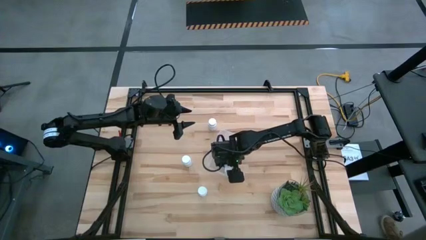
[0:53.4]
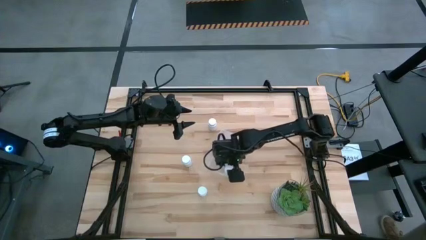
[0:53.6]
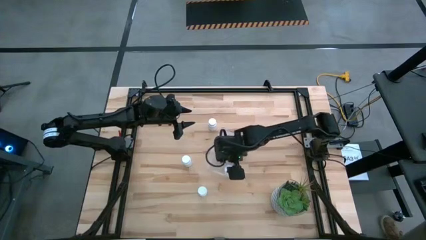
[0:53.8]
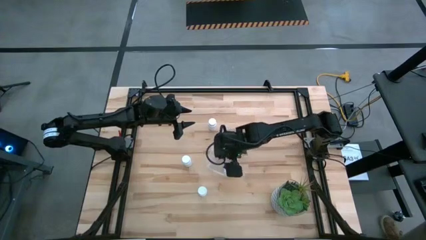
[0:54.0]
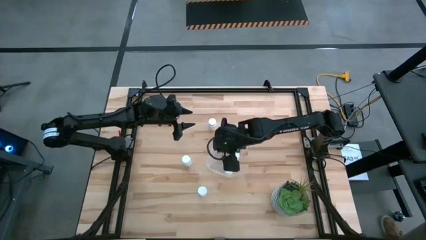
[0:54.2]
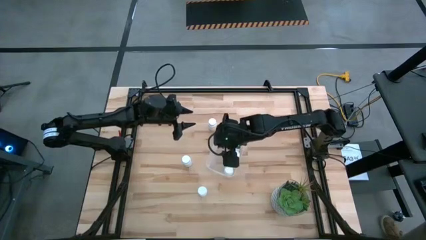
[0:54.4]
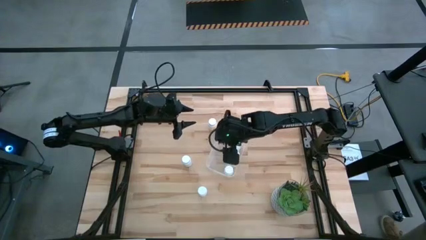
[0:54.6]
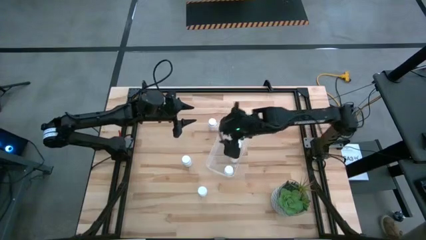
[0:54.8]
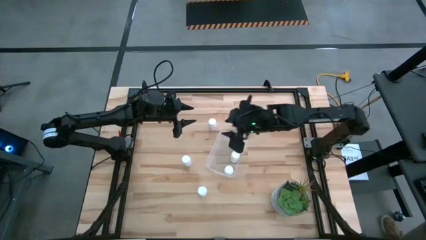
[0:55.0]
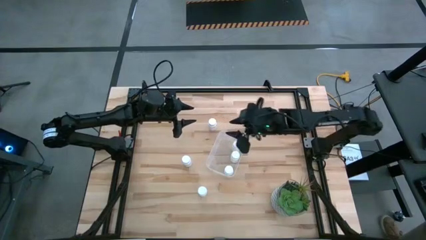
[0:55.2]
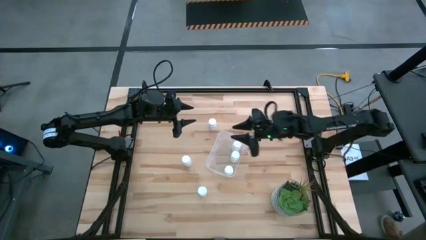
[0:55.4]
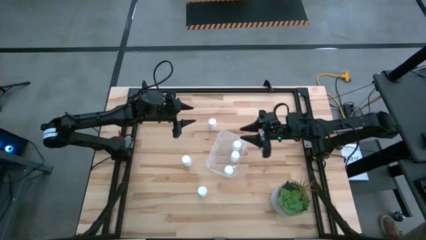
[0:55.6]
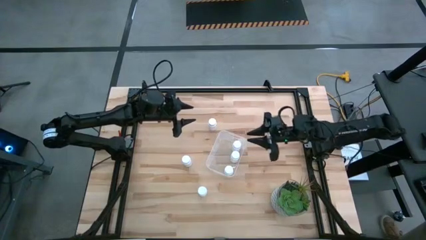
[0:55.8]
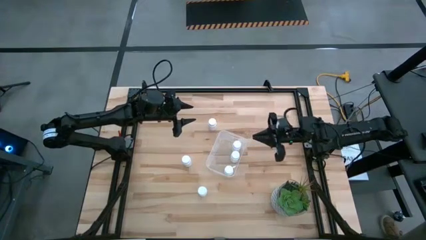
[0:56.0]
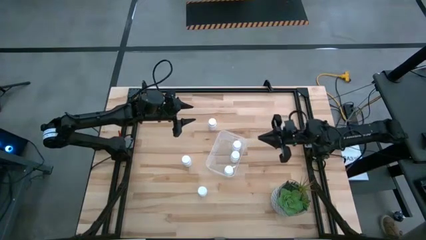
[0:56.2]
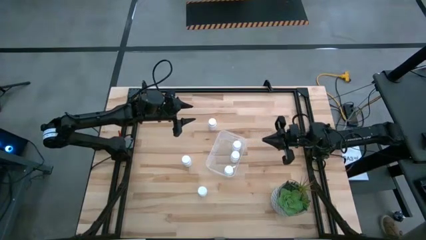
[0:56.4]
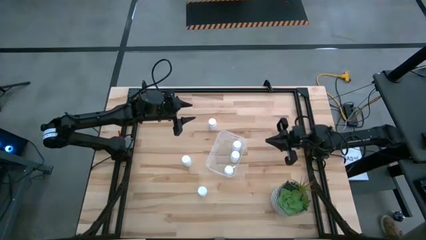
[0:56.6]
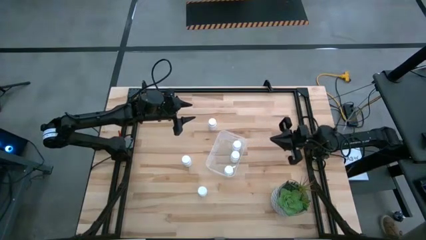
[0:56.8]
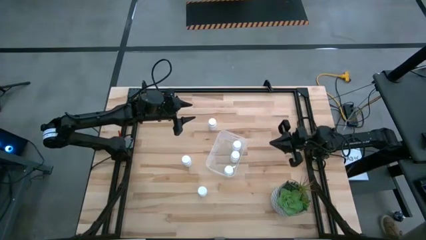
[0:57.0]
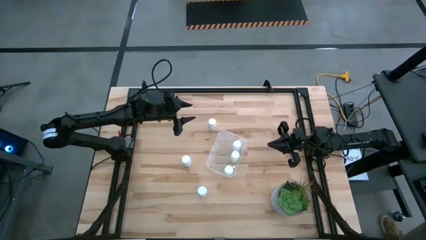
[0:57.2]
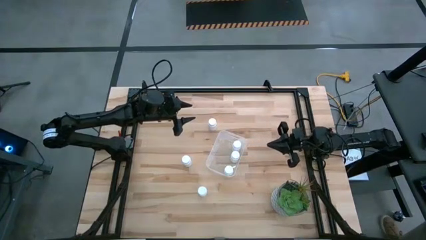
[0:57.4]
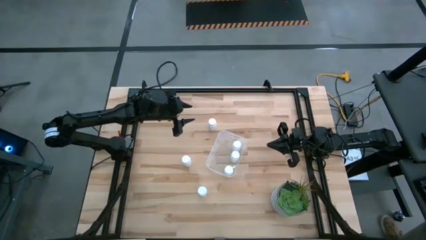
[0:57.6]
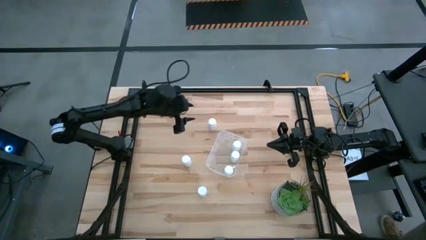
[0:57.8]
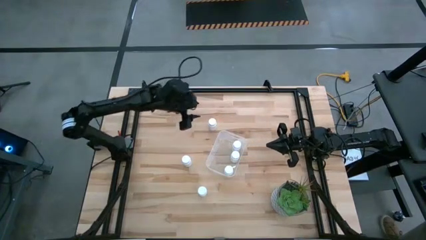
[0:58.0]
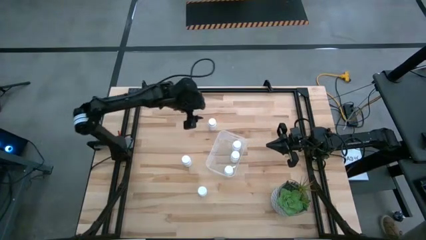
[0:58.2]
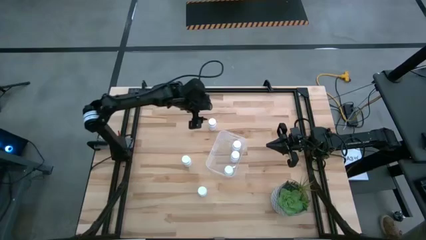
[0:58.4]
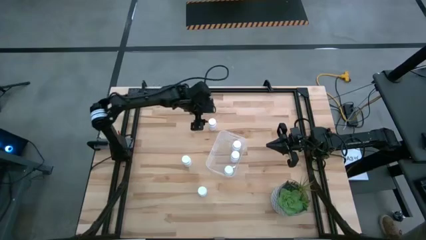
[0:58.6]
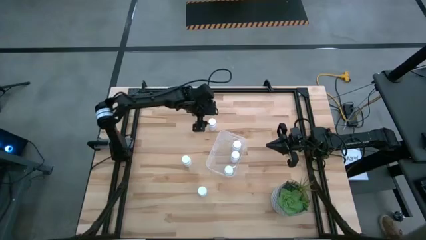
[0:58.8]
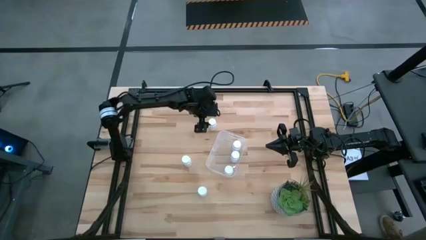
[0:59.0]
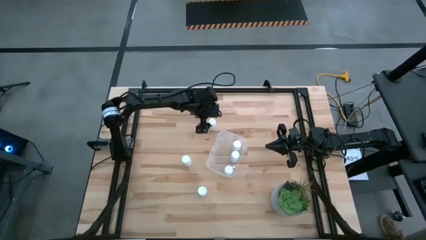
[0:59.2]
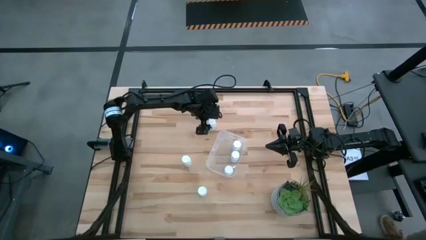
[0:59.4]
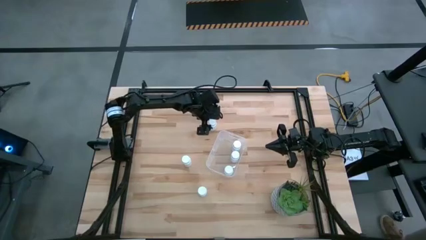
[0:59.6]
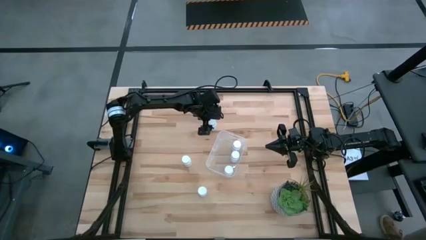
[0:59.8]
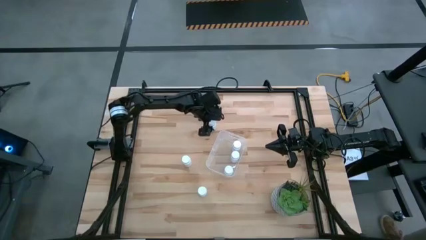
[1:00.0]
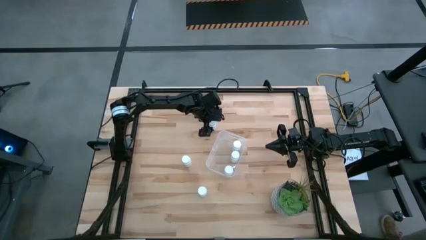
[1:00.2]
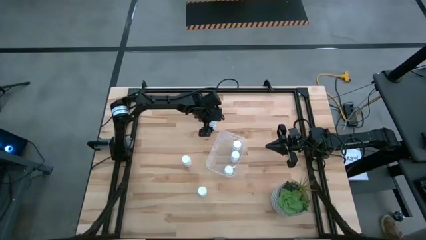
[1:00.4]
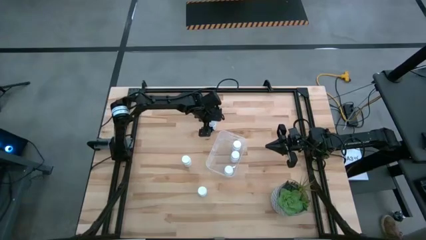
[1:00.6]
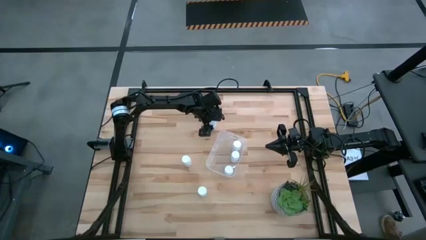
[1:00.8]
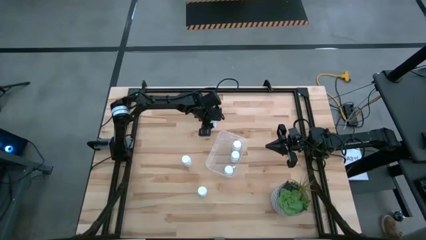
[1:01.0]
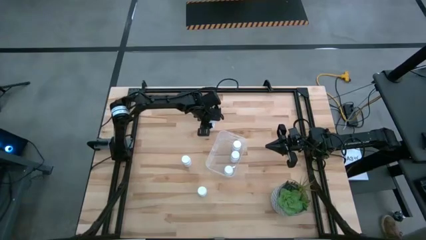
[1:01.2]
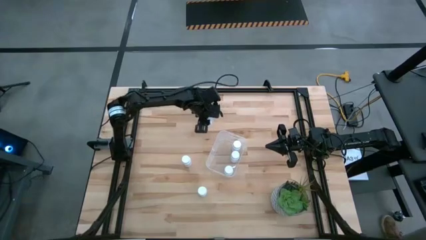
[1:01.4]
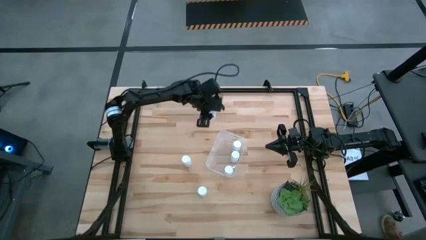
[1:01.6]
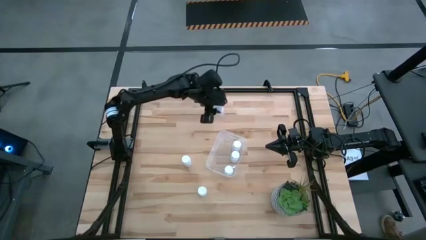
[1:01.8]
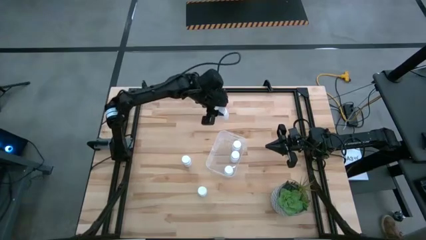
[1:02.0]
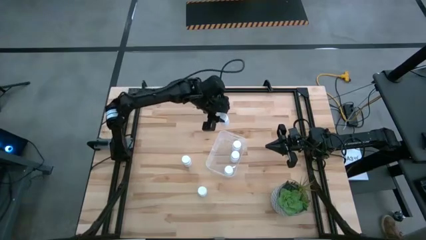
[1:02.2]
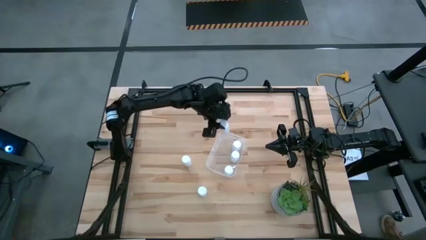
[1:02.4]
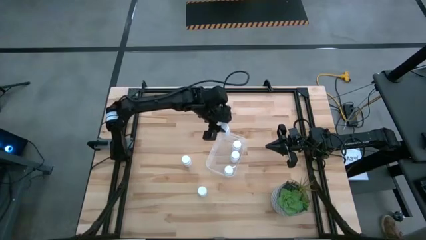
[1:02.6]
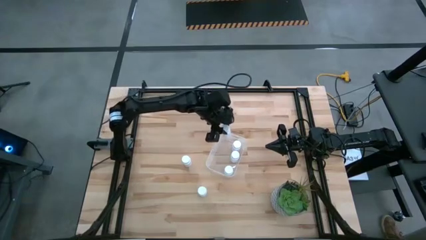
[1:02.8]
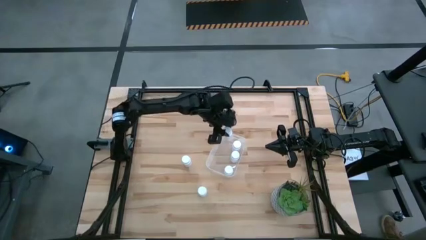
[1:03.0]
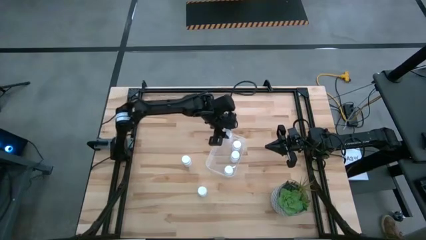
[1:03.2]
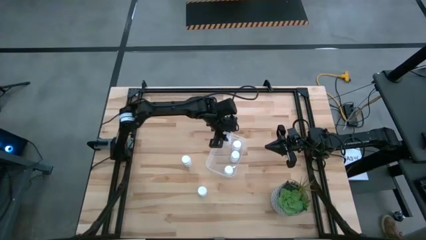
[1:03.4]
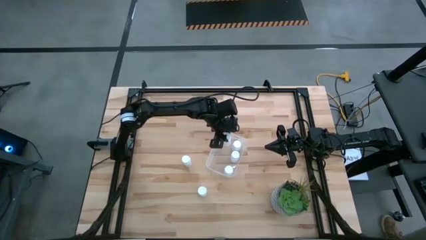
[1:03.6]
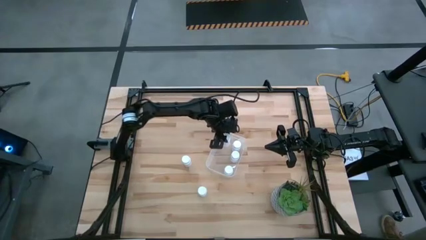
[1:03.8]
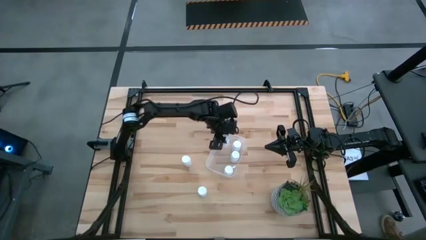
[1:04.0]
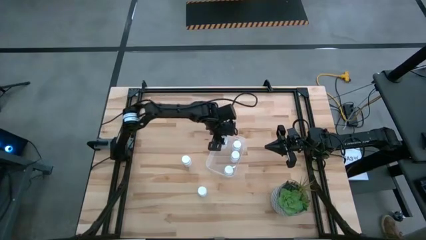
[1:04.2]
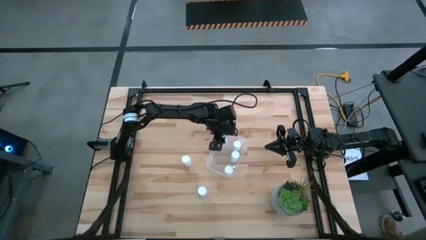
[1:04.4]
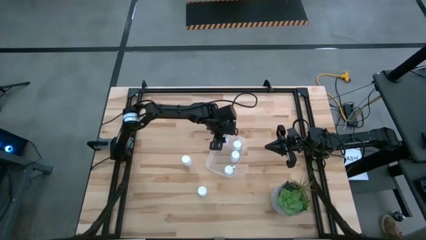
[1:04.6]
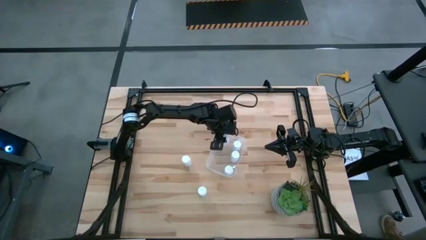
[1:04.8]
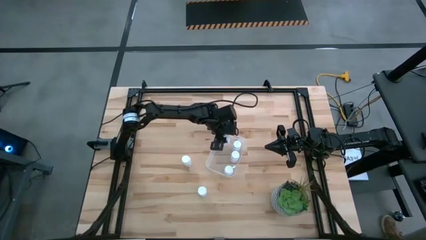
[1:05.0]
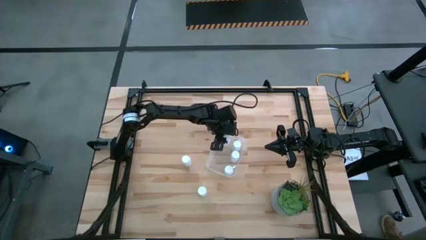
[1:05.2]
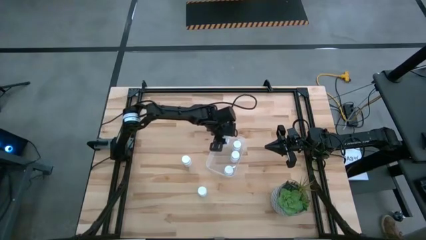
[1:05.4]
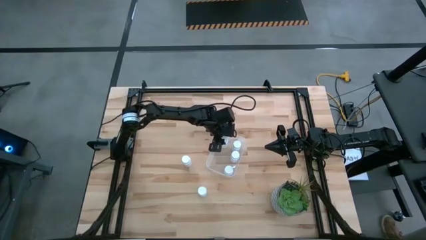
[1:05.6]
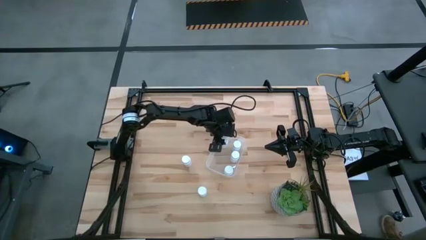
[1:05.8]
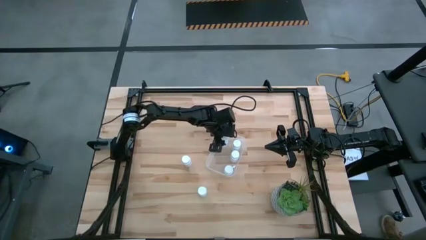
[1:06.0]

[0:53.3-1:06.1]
Task: Pick and place pill bottles into a basket
Put the medicine bottle into the transparent bin

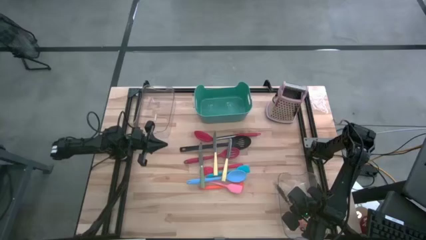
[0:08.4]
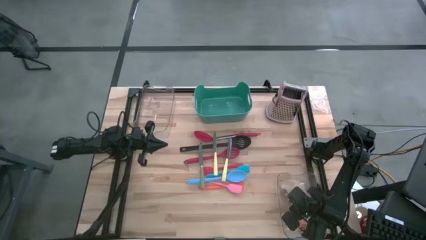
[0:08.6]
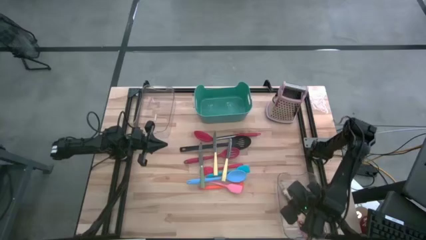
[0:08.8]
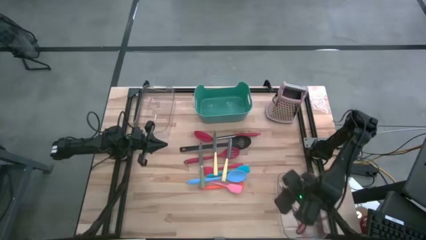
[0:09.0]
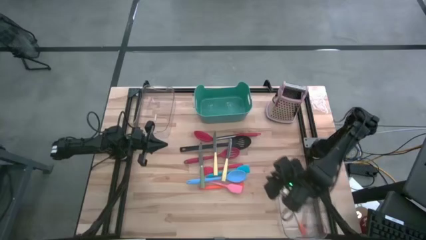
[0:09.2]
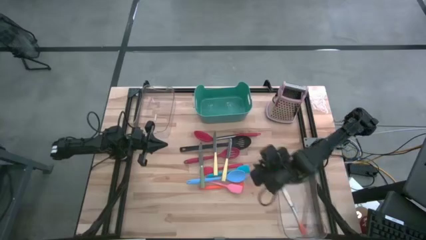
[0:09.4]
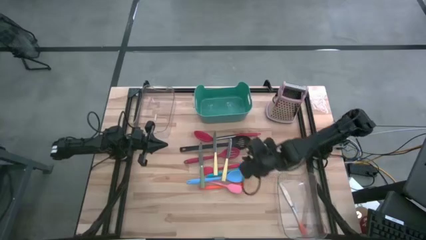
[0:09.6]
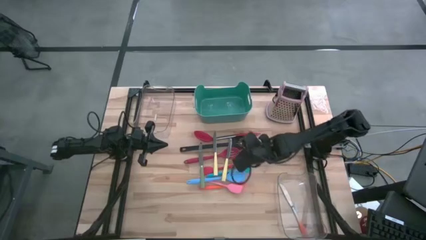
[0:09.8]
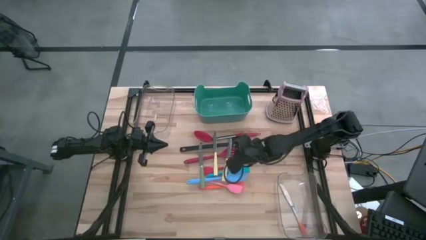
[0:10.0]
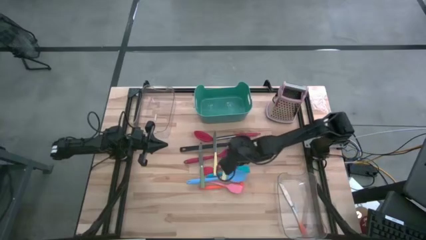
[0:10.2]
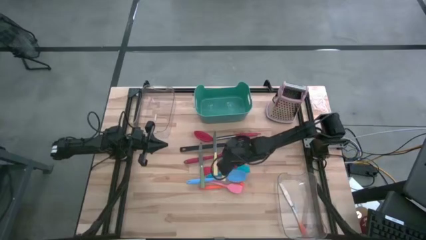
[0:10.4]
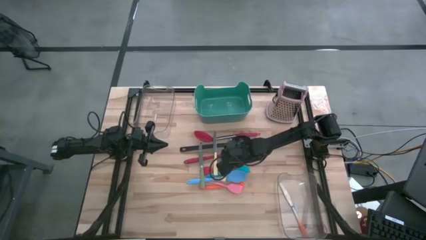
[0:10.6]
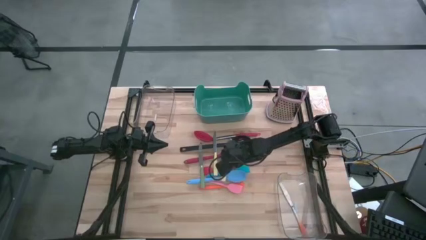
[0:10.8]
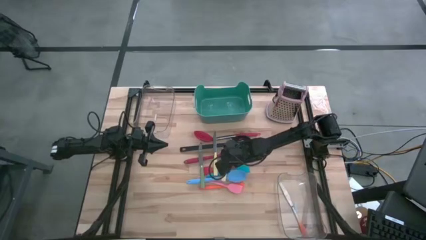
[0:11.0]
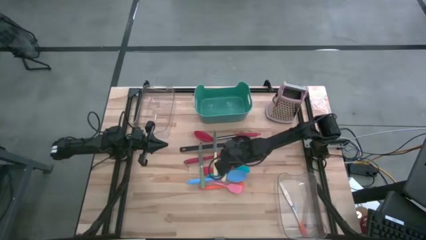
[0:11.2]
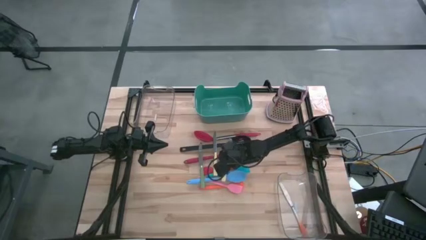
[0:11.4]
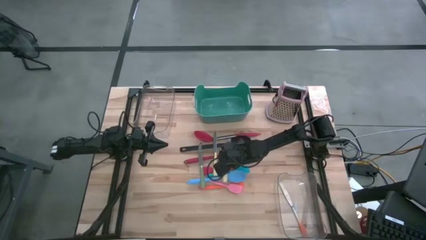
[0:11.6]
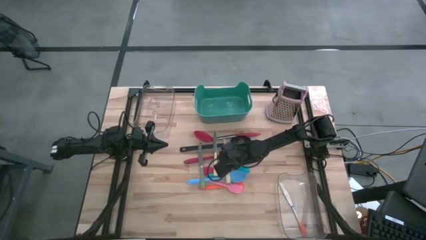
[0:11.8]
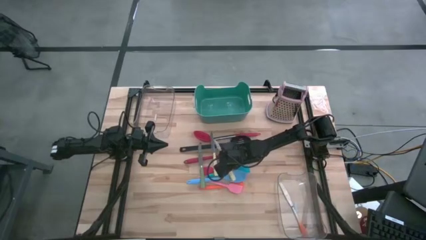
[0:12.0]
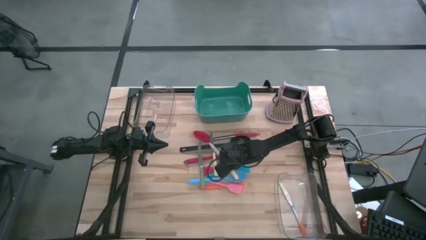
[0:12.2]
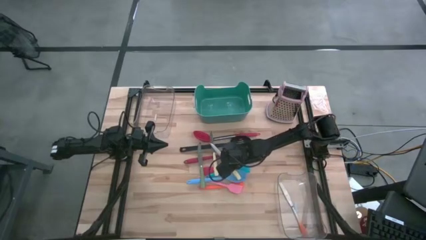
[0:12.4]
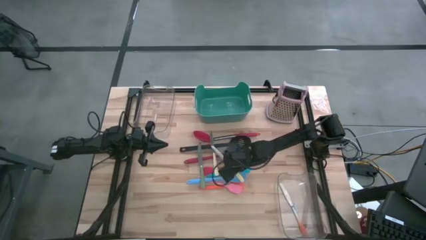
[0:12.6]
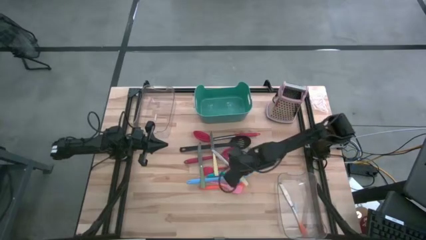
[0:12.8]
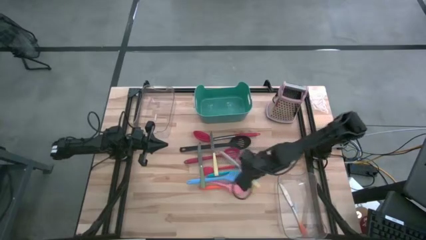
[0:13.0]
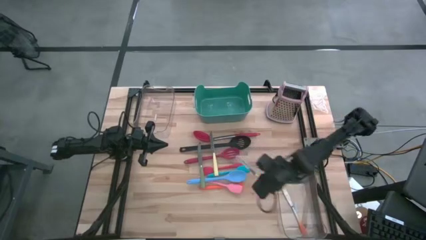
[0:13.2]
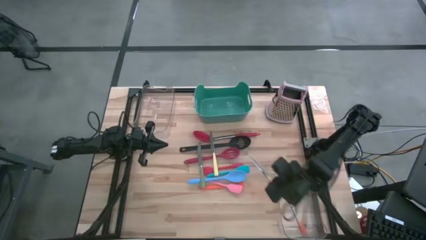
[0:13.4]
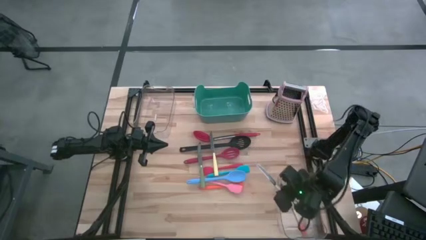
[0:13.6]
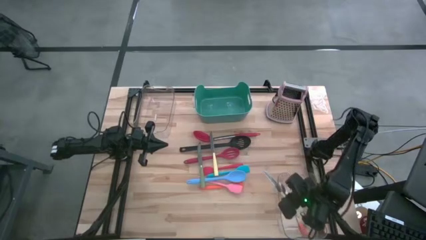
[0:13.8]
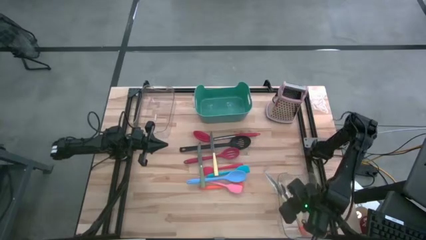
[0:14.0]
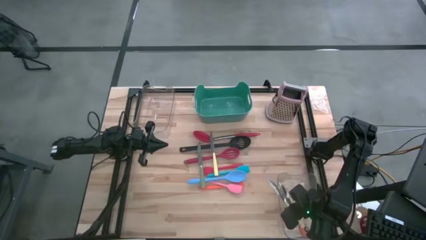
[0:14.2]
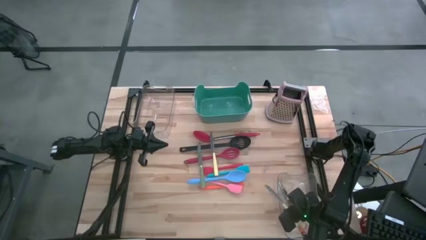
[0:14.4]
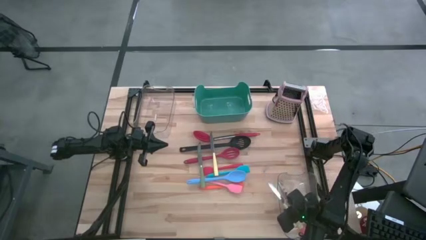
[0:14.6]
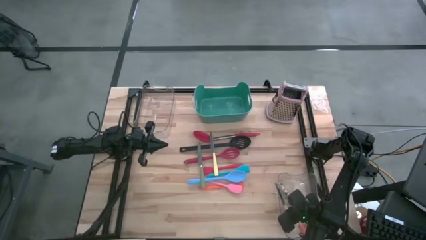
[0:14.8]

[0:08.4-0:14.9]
Task: Pick & Place Kitchen Items
Put the right yellow knife into the bottom transparent bin
